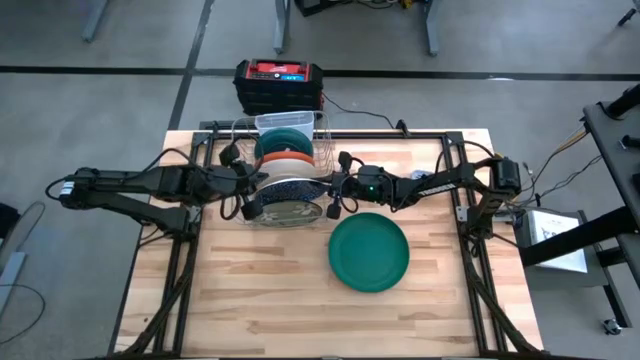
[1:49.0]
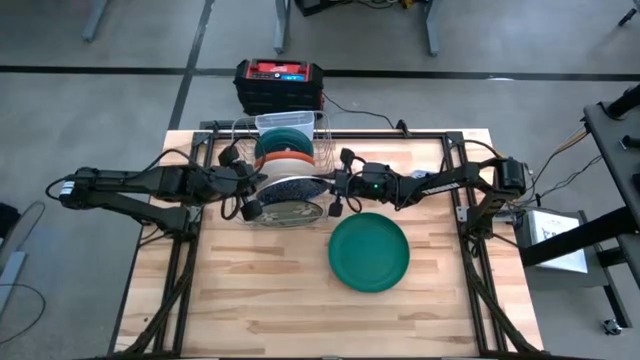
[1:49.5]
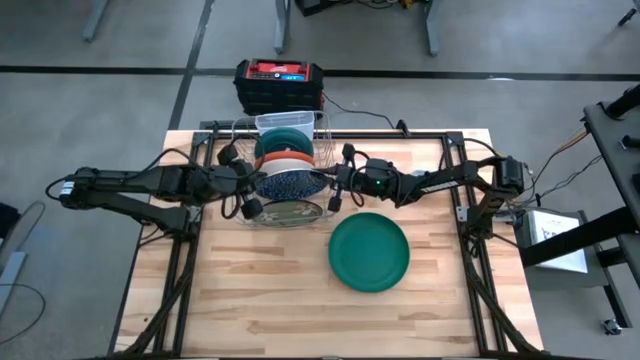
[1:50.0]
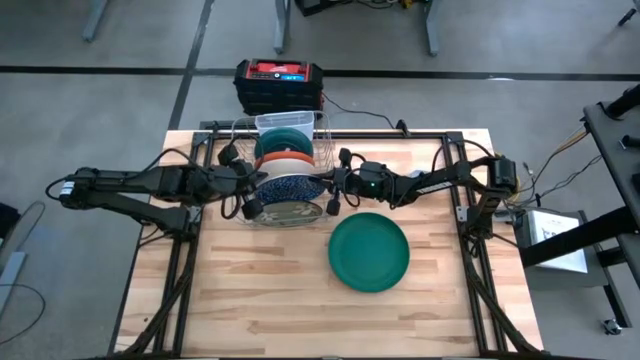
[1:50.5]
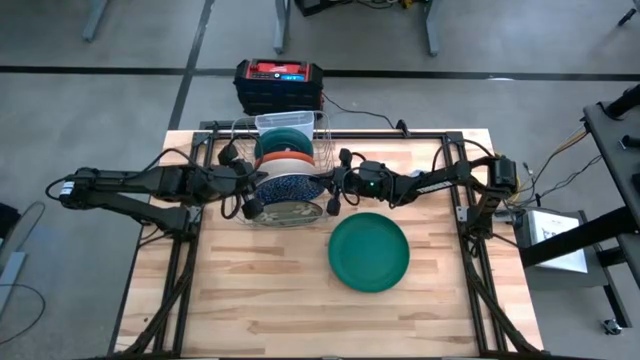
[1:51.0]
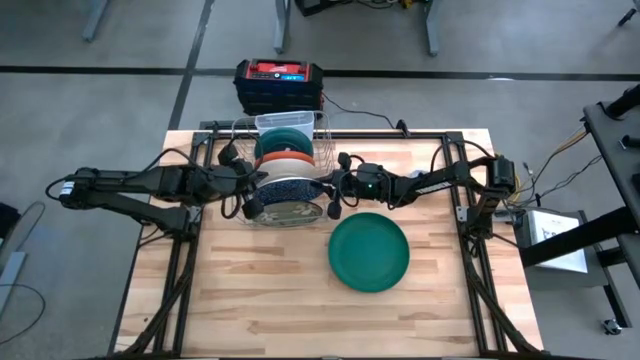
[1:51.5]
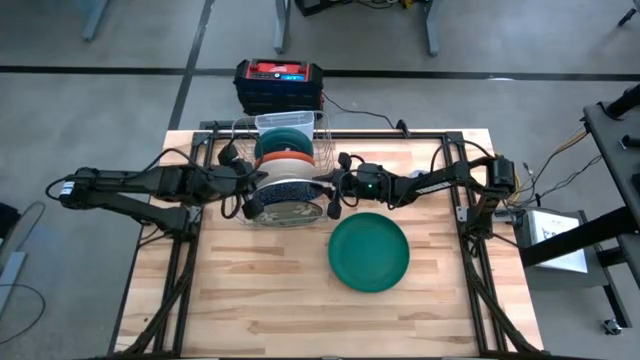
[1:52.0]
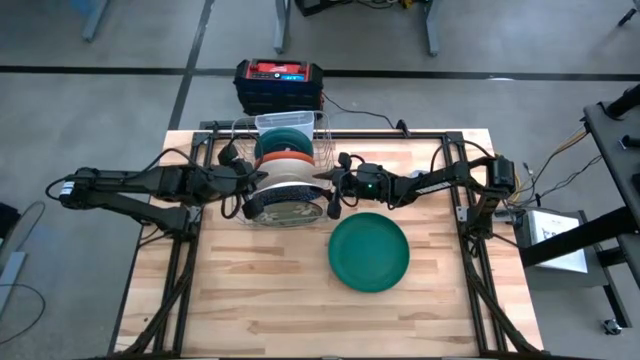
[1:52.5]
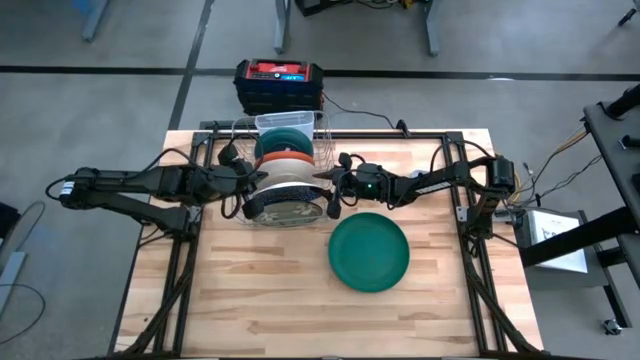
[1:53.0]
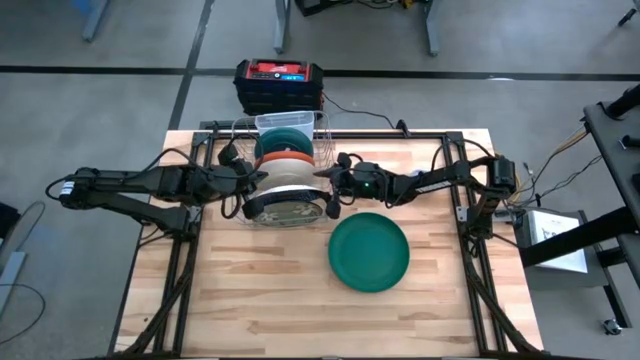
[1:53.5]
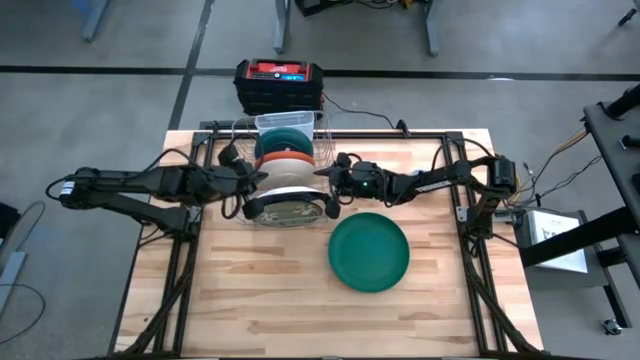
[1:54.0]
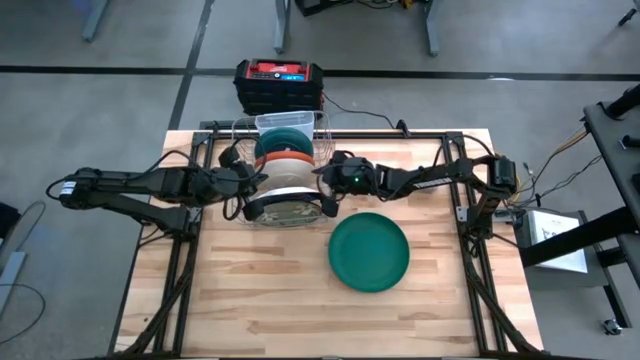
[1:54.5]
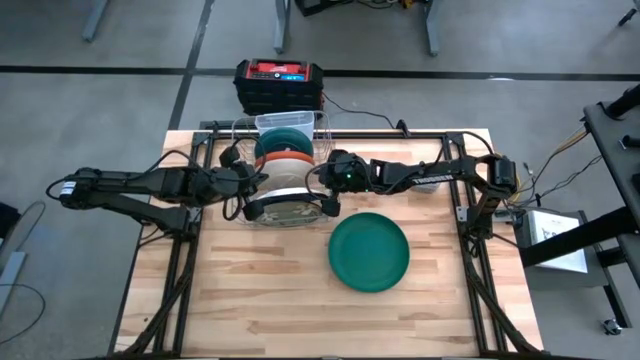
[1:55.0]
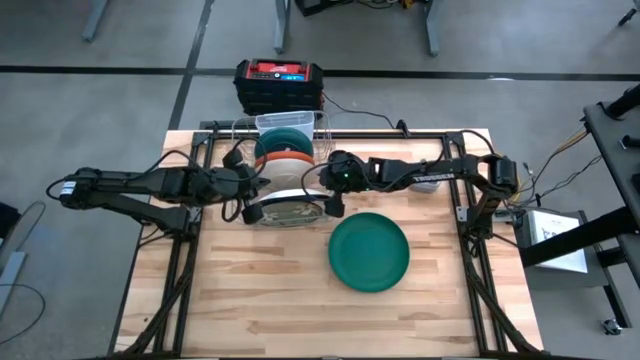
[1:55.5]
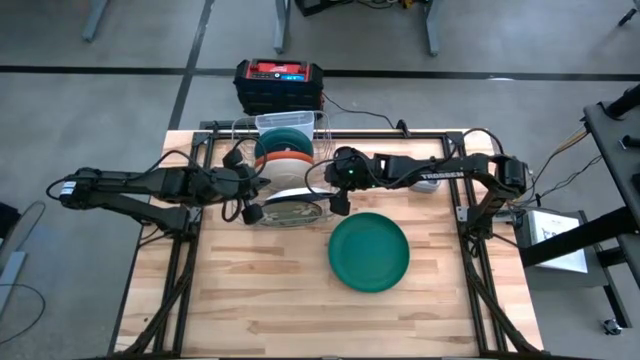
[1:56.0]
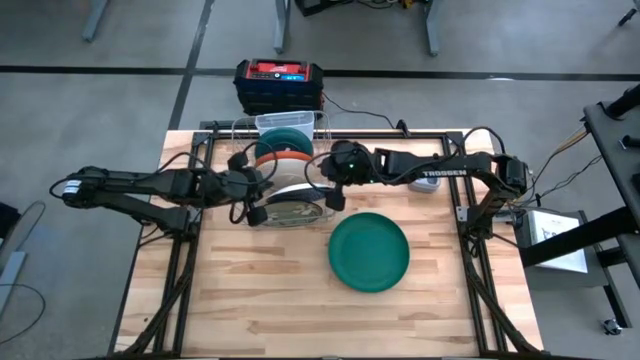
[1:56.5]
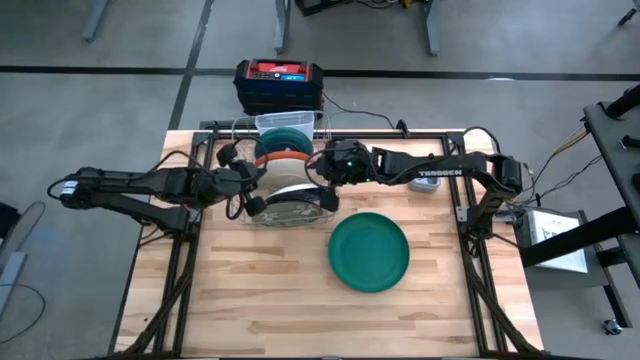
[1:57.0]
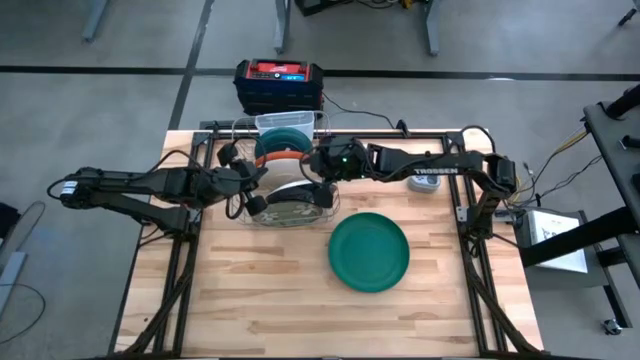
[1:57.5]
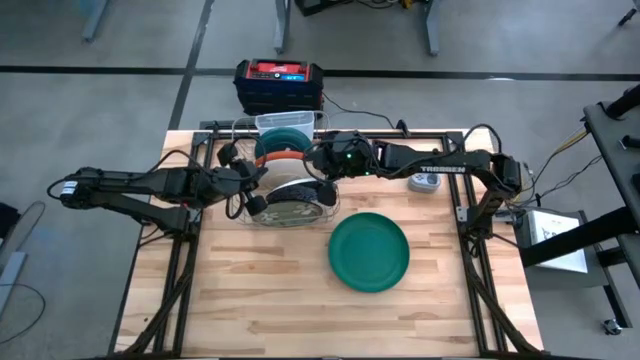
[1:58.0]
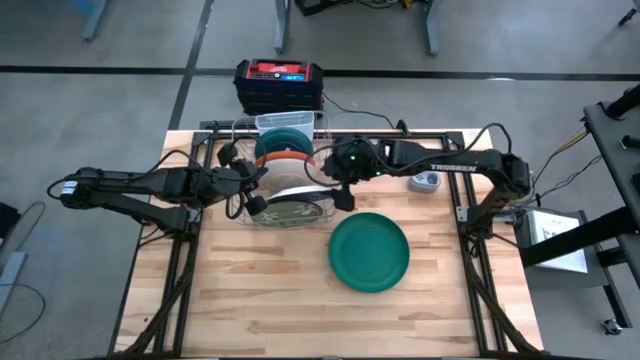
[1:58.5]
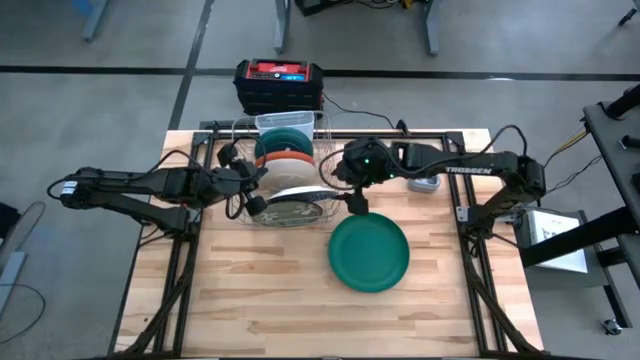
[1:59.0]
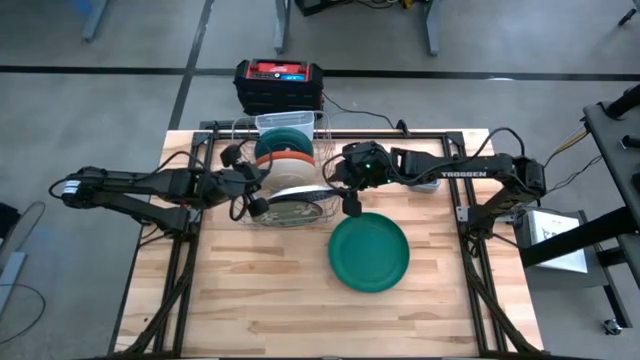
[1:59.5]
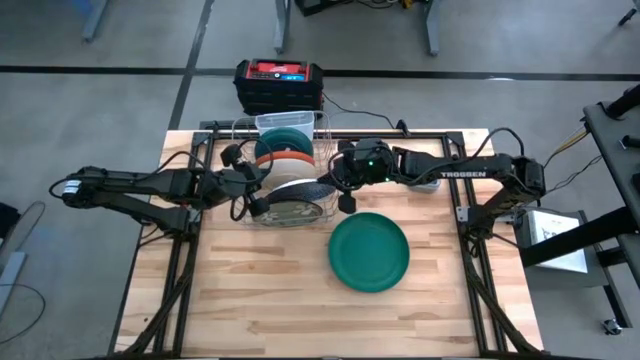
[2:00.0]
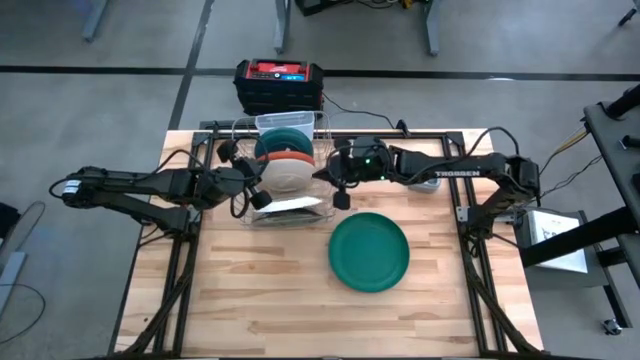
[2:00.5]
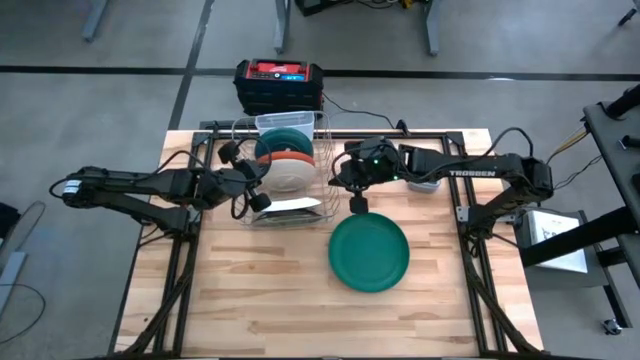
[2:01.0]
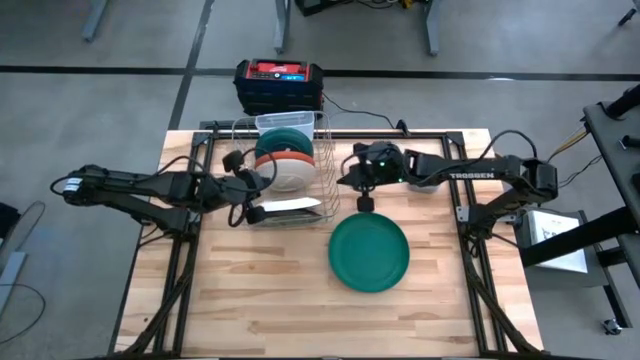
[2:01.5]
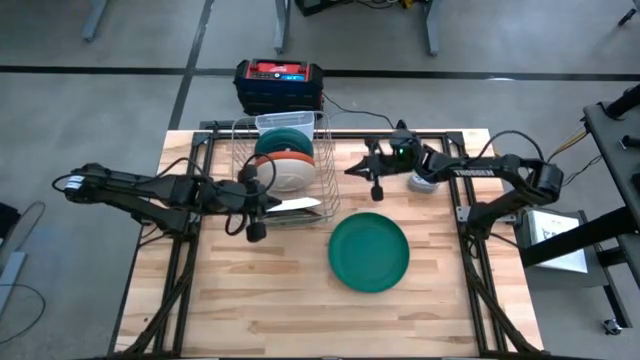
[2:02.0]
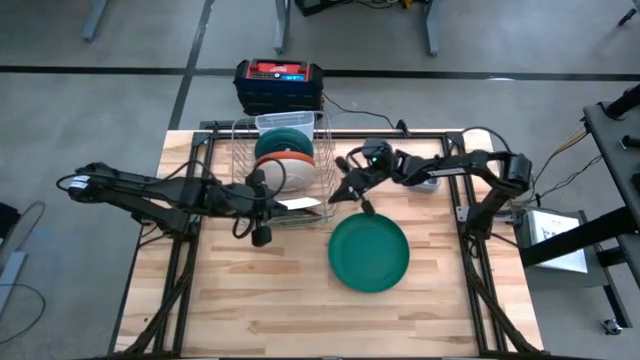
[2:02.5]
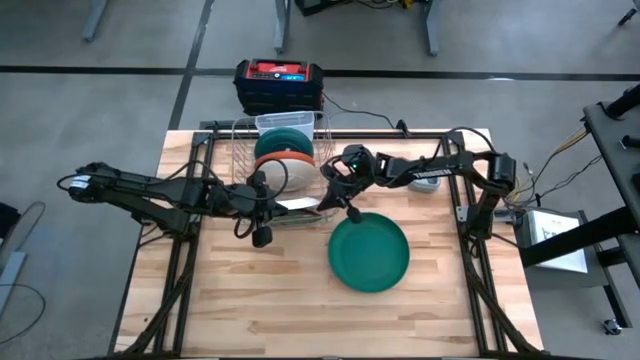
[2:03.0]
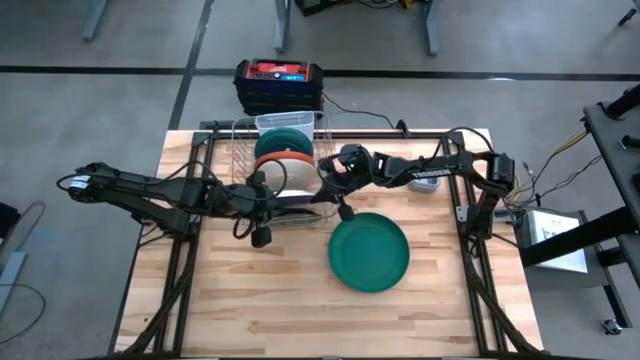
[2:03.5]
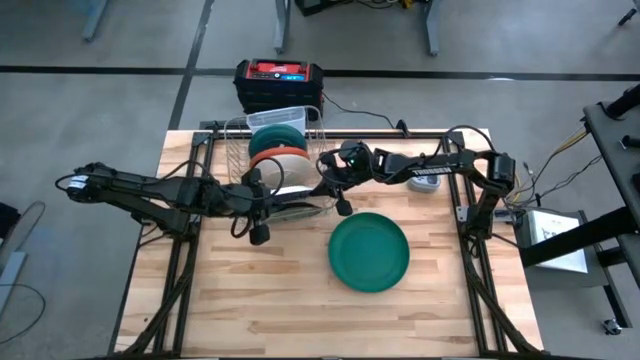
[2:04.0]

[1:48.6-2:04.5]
Task: Sort dishes
Put the blue ceramic plate into the dish rack

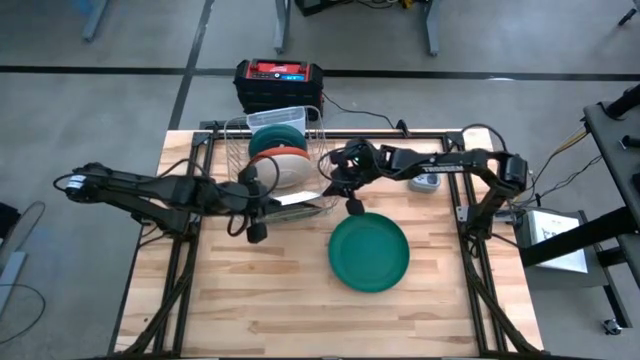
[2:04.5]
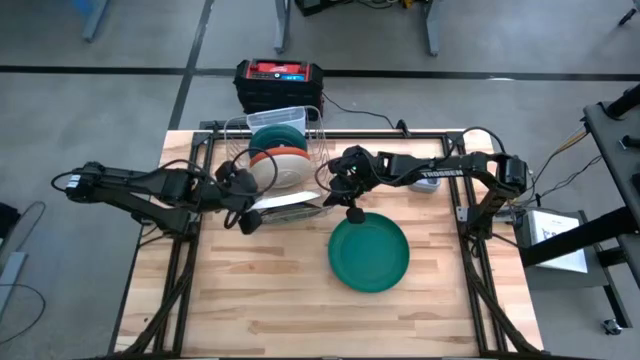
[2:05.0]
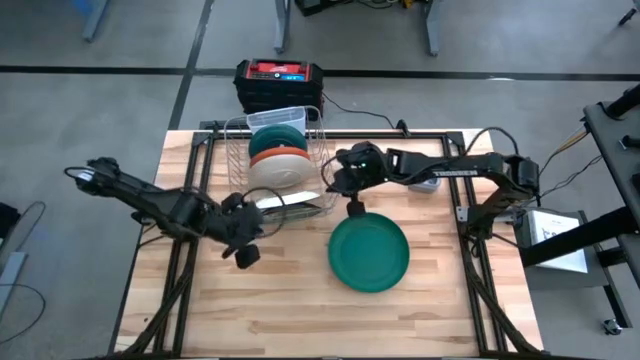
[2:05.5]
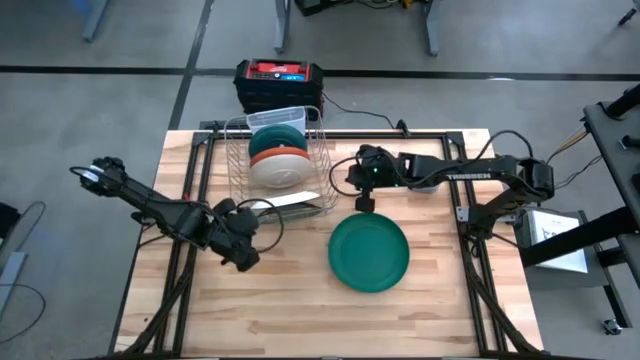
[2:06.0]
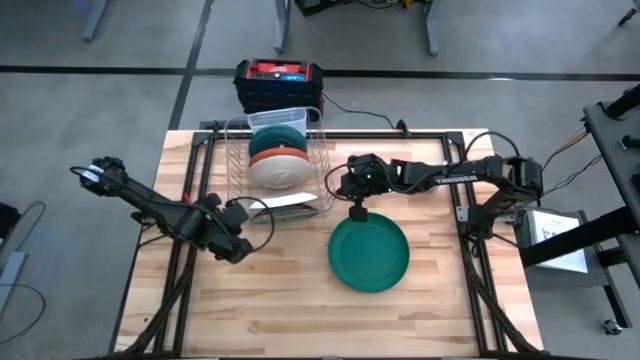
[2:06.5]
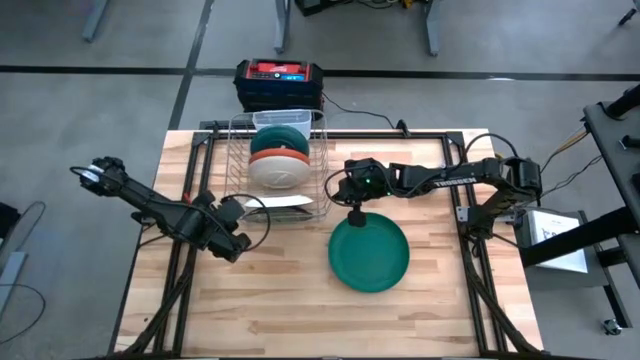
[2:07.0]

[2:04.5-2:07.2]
Adjust the dish rack

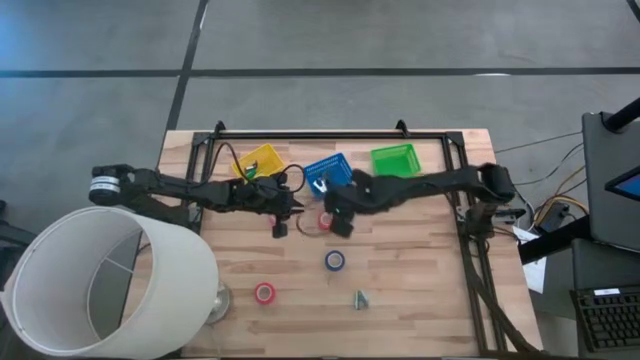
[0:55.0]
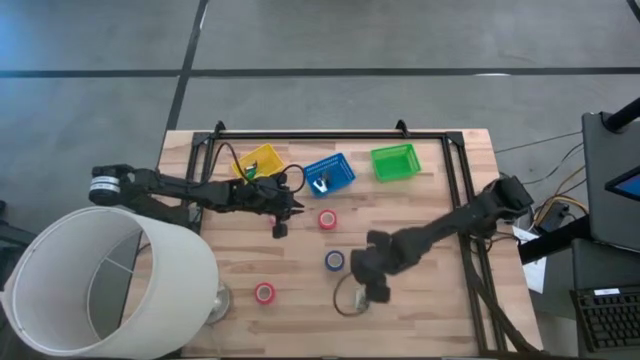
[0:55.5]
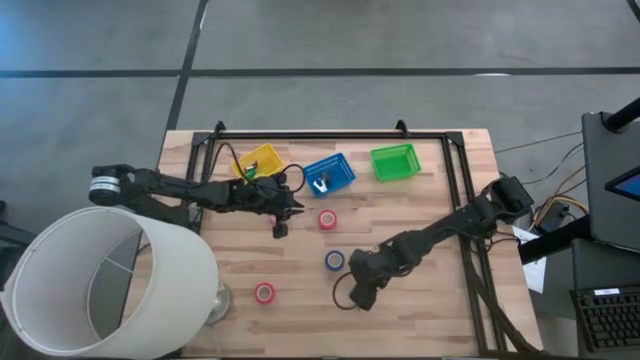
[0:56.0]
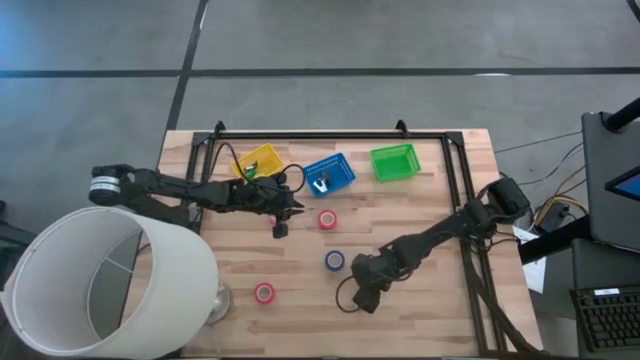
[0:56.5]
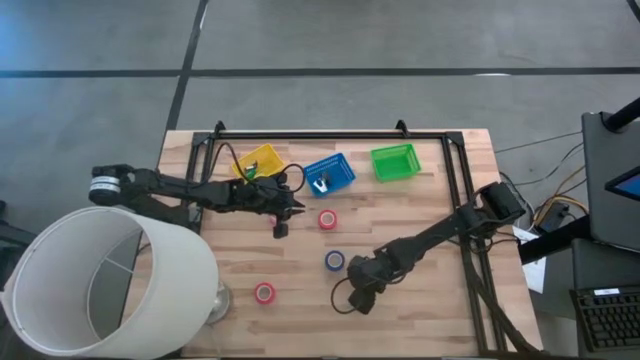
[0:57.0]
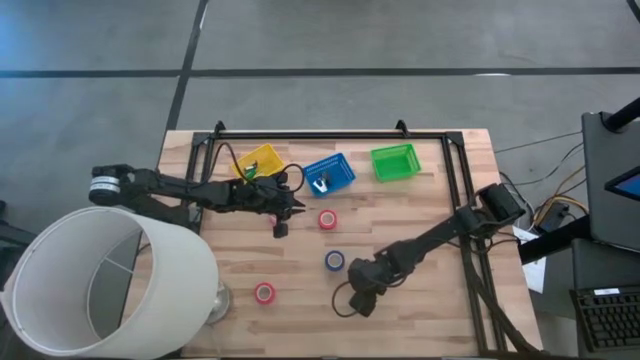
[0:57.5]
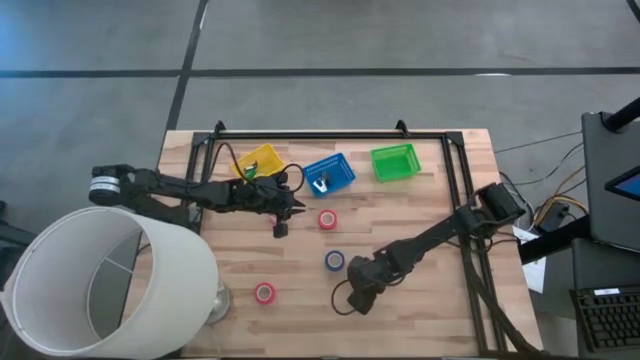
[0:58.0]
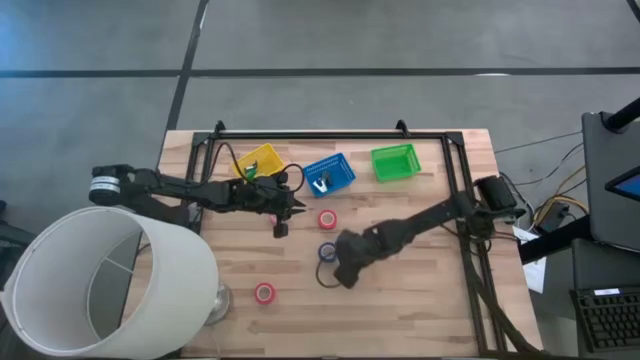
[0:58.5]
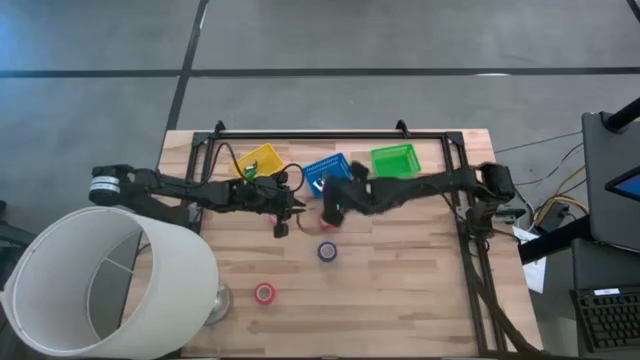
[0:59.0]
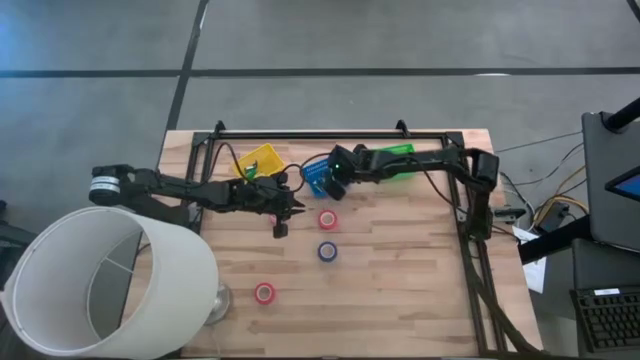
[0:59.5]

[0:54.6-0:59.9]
Task: Pick and place Stapler, Stapler remover, tape
Put the light blue staple remover into the blue basket
